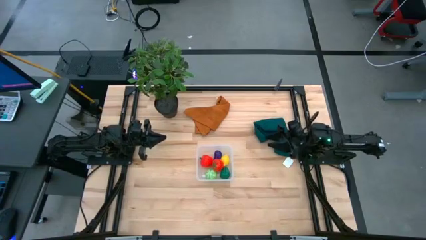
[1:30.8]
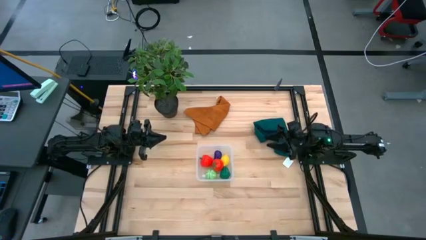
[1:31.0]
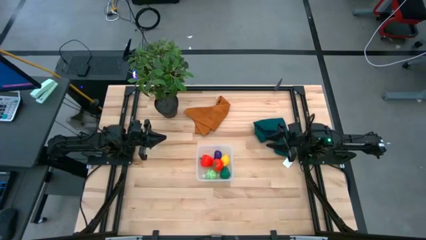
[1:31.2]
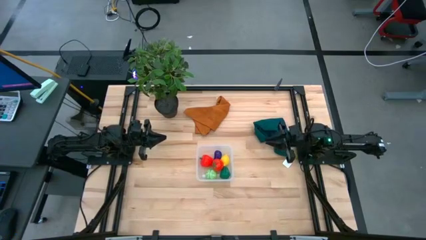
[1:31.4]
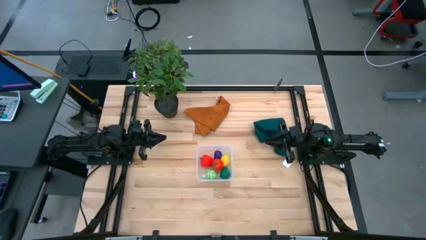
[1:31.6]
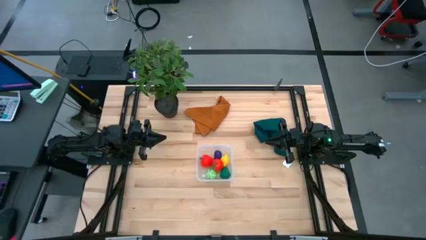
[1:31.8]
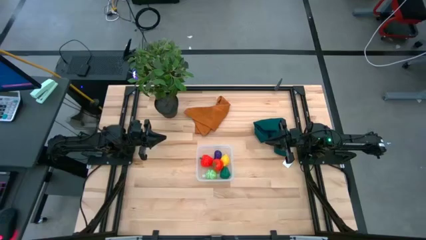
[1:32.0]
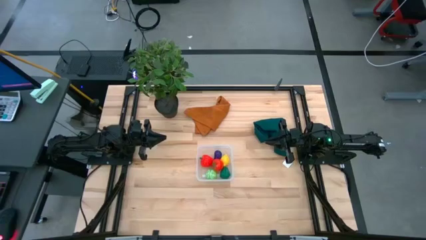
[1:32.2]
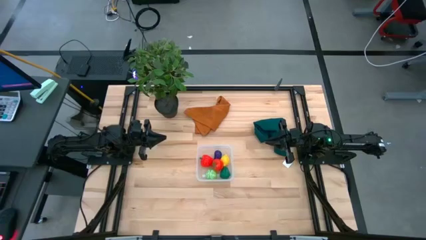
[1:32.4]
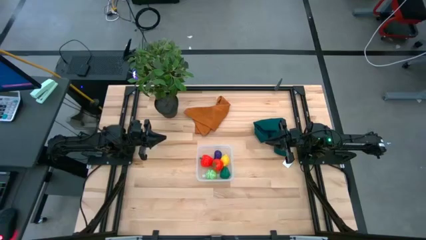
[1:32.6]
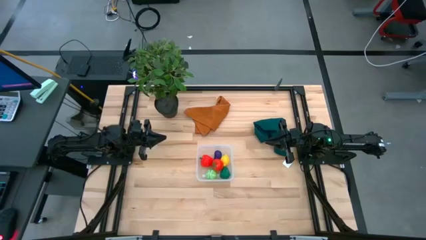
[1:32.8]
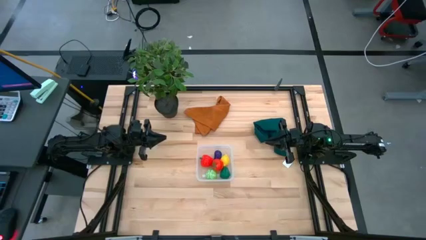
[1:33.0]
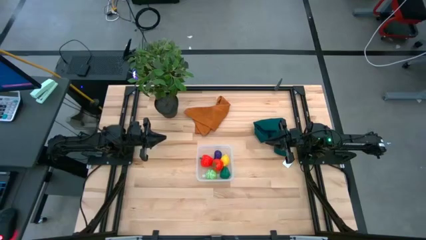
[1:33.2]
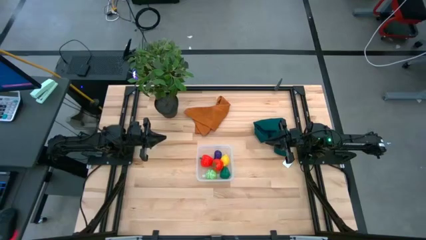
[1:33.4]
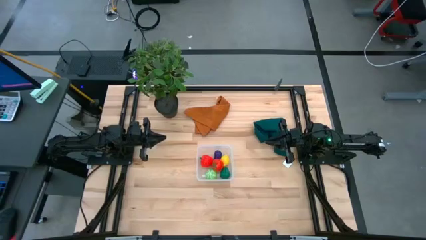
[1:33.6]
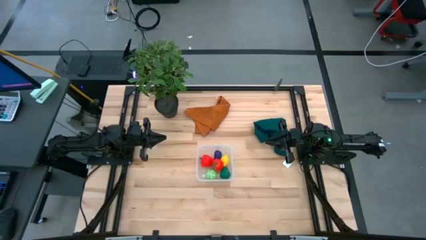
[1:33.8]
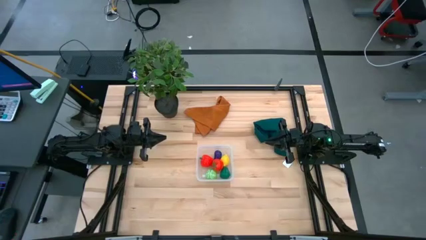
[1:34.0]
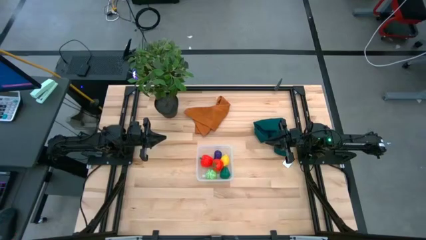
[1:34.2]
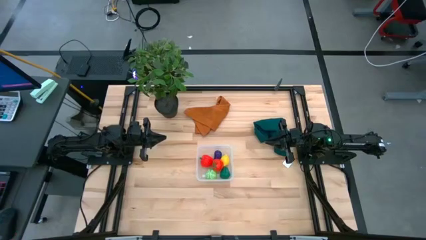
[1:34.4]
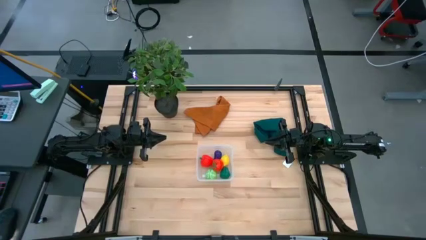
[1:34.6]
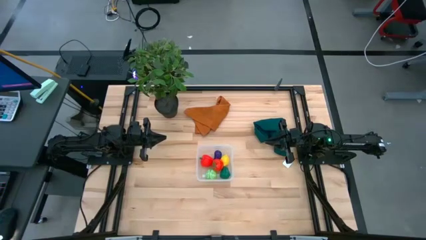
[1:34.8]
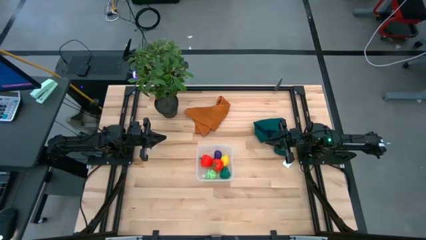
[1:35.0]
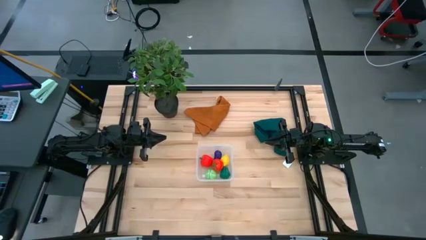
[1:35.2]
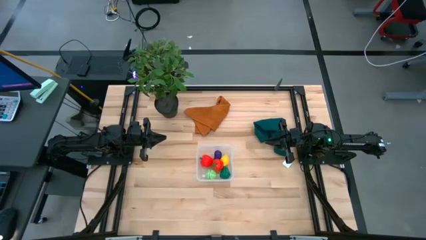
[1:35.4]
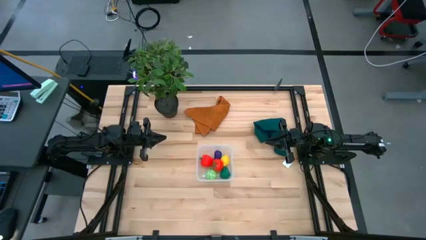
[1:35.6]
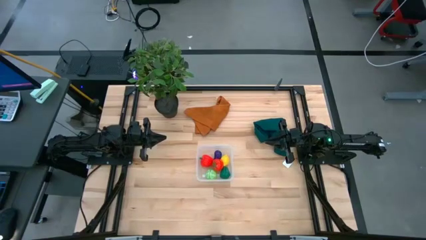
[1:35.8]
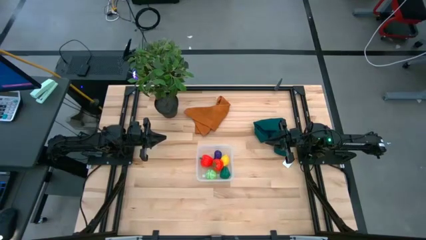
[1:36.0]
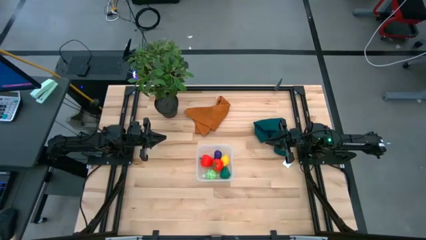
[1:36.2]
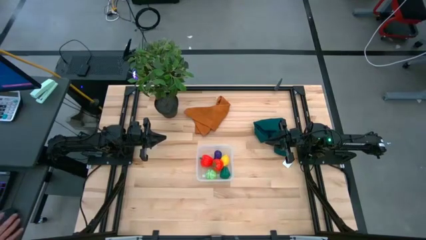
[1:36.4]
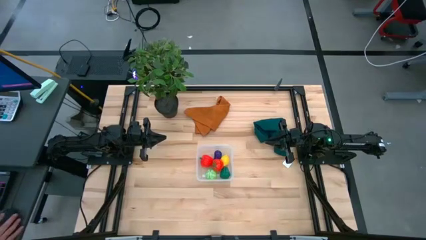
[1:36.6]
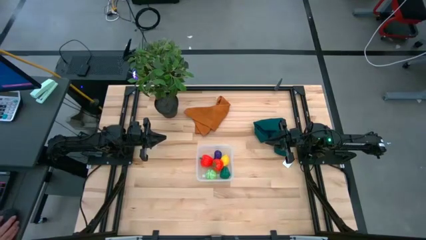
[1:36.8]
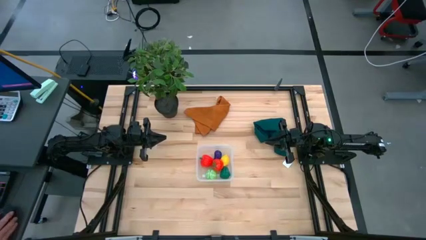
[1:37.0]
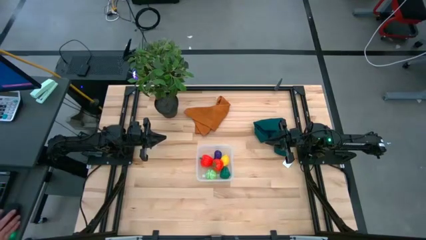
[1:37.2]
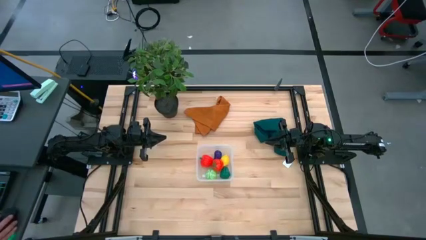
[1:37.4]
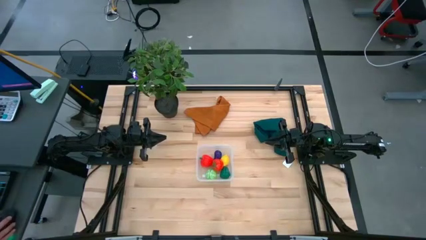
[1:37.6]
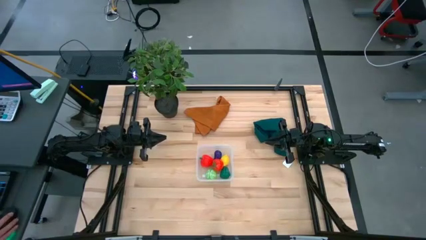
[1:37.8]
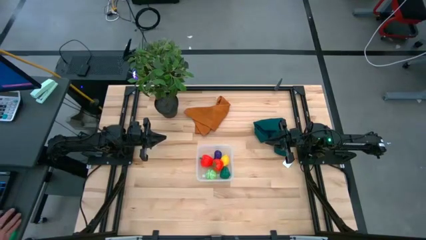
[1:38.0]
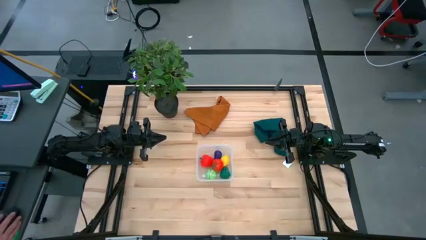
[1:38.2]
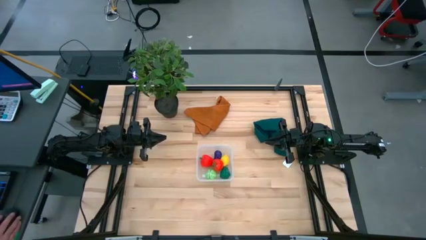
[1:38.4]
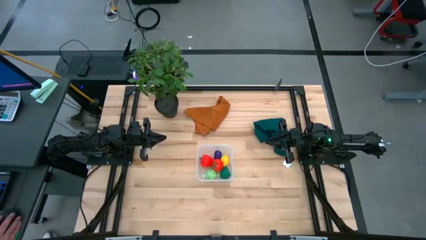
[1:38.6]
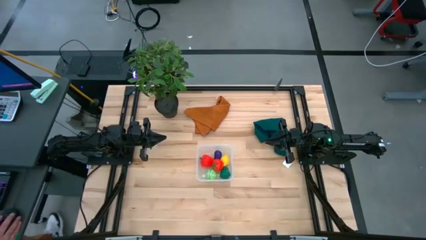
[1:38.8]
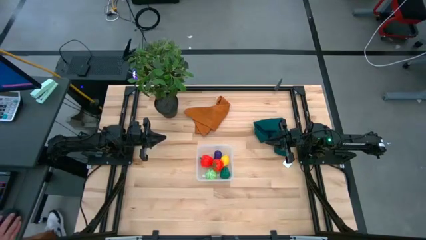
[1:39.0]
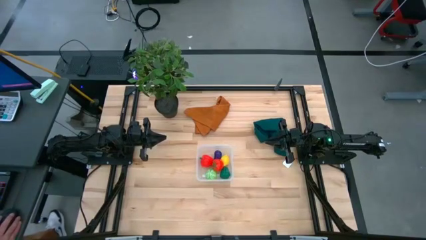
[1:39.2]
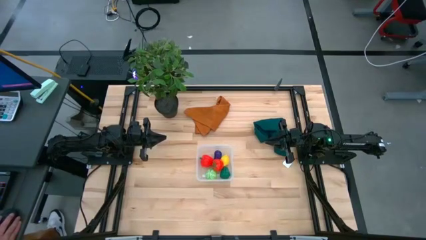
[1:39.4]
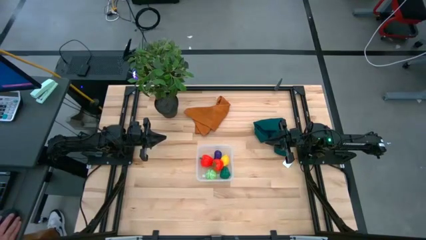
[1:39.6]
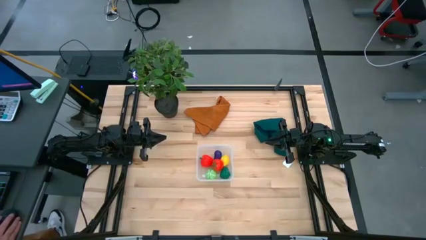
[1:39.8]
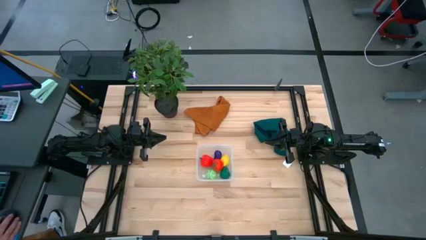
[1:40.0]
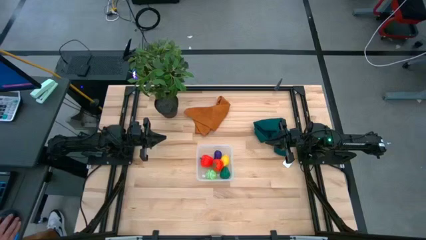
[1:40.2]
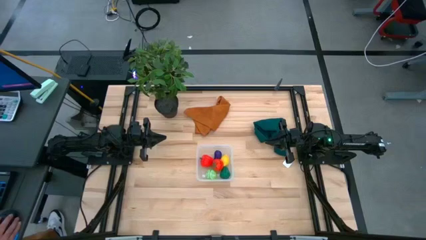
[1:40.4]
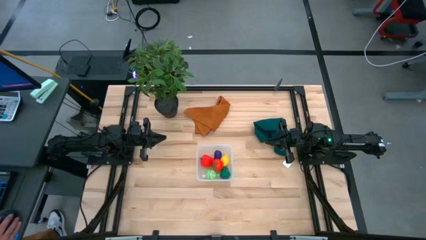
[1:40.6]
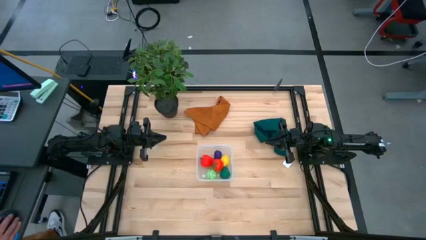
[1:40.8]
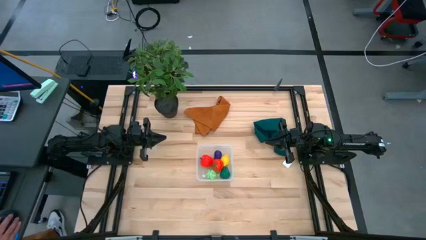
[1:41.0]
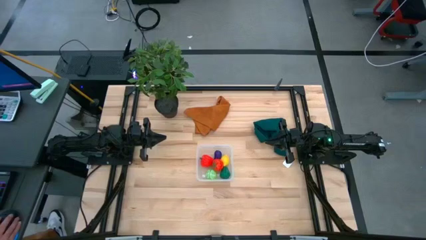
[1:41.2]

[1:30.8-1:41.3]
Task: Pick and placing Produce into tupperware
Return to Home Position

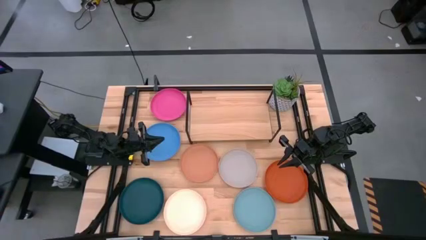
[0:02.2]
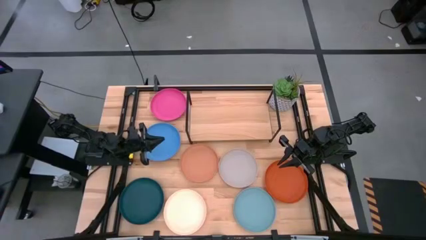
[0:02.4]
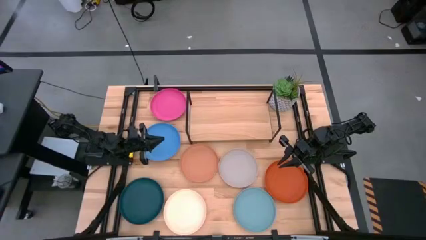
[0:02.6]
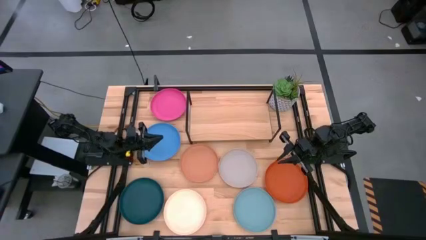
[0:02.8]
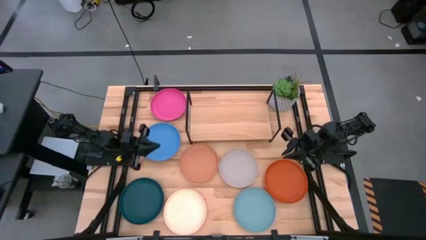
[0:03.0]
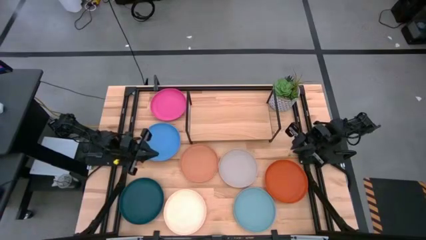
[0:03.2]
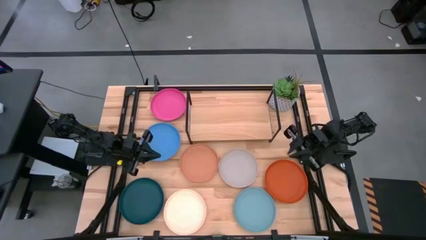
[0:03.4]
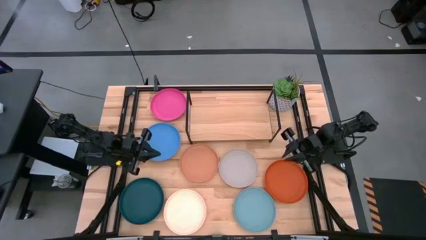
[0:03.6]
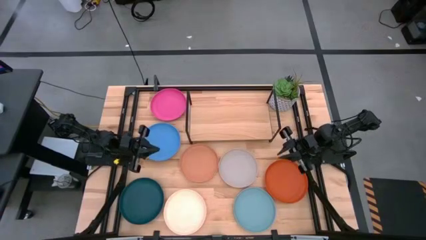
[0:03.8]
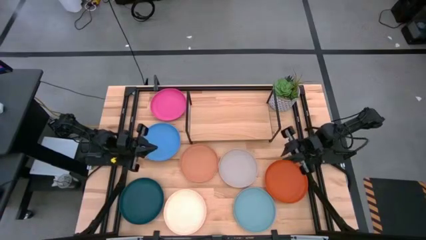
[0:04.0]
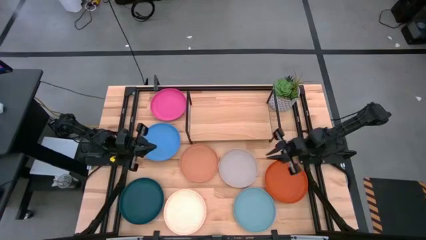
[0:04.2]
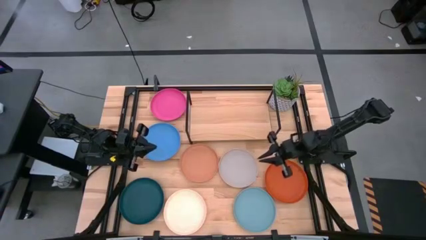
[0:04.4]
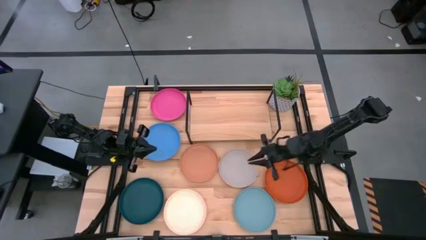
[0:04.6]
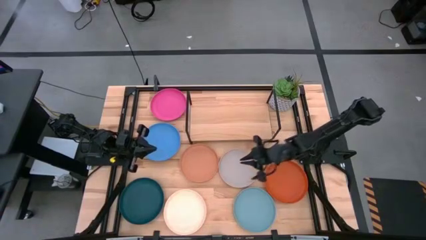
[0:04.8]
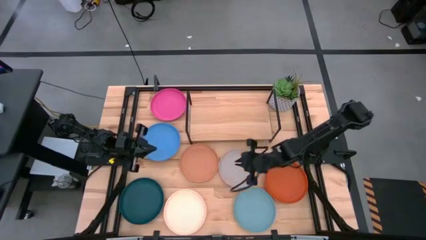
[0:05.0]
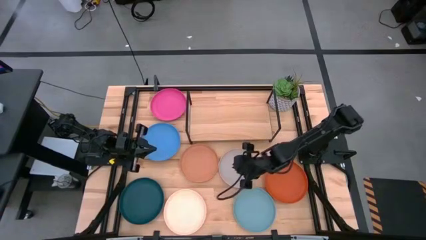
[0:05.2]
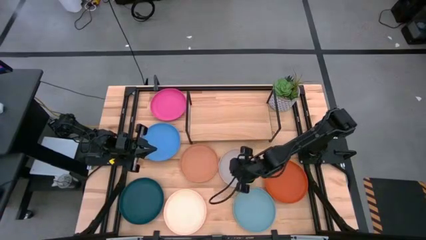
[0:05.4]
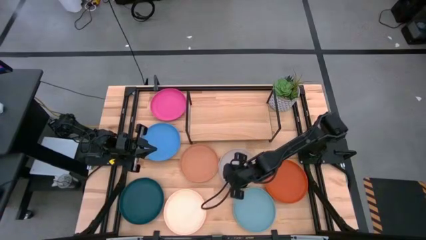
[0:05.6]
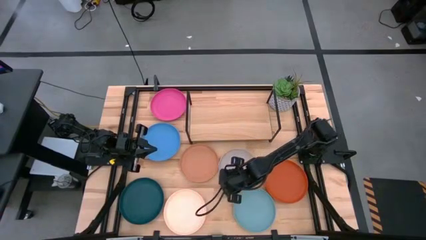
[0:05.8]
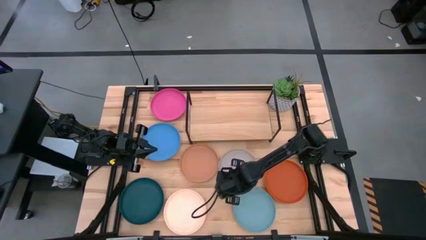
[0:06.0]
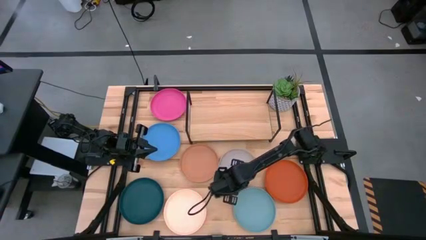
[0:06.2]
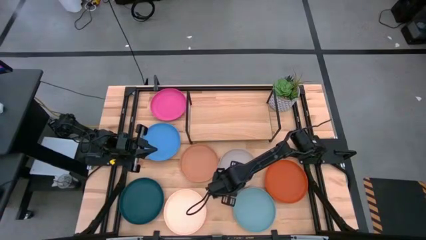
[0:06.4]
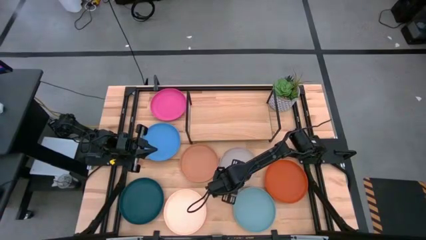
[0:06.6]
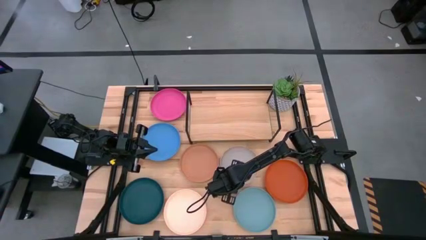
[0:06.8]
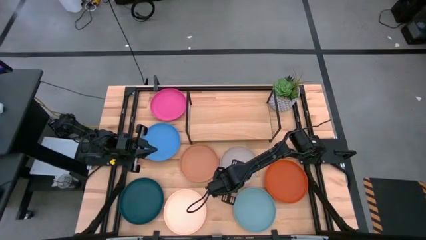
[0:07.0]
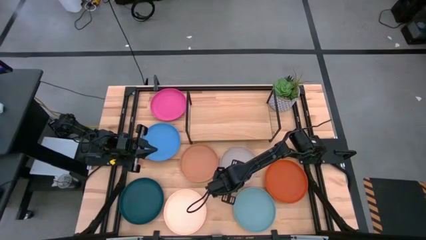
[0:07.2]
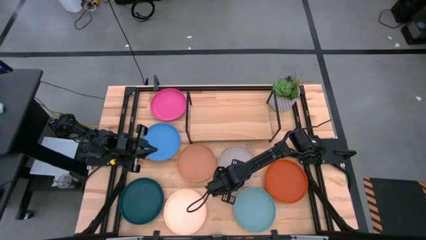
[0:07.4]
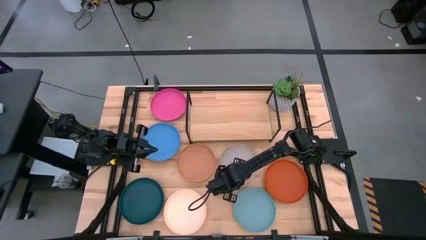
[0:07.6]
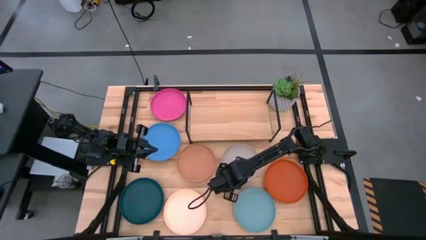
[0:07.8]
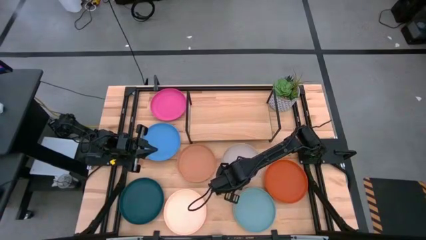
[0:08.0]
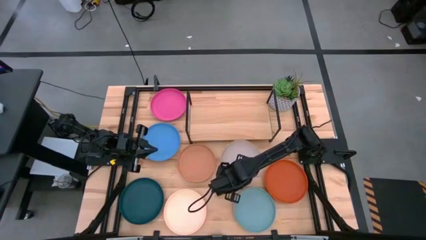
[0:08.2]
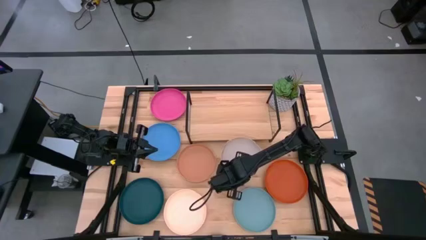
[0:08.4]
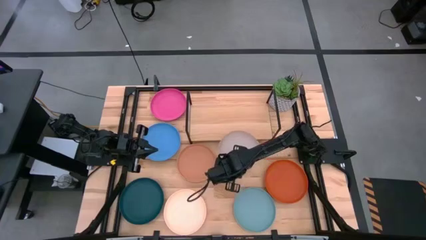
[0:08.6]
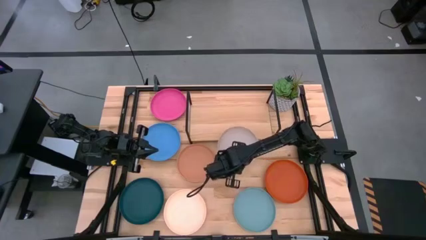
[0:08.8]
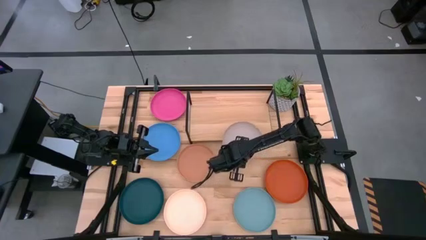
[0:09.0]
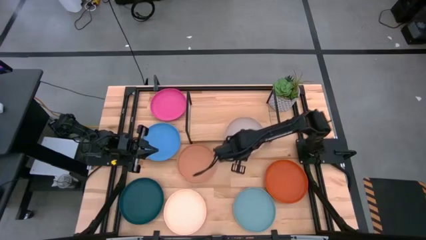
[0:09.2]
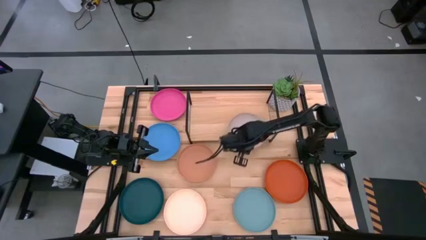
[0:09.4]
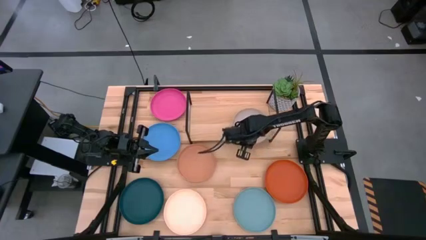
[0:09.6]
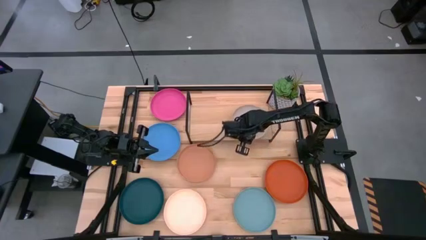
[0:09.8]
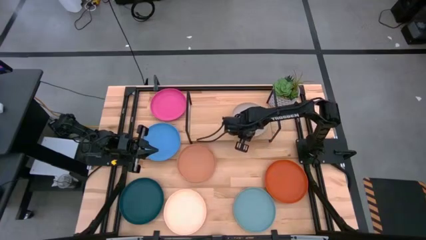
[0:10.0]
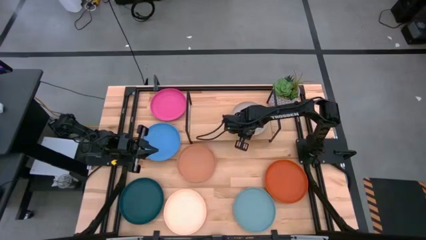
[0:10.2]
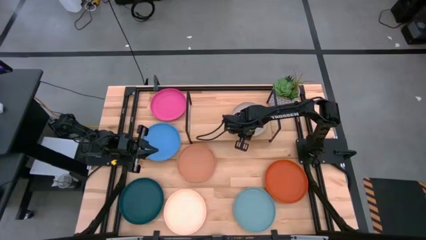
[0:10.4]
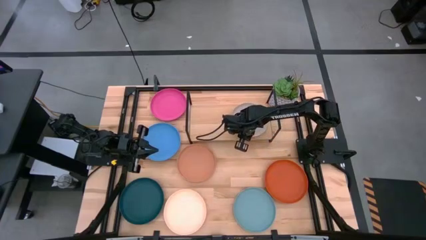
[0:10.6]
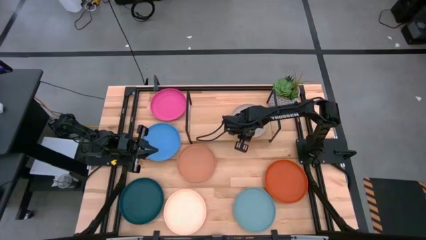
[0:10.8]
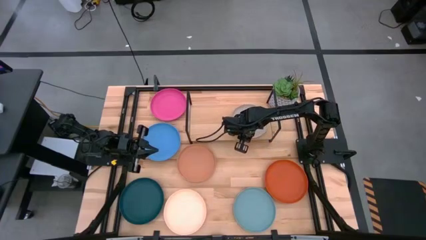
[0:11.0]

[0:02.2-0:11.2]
Task: Place and stack plates onto a shelf
Put the grey plate on the shelf
